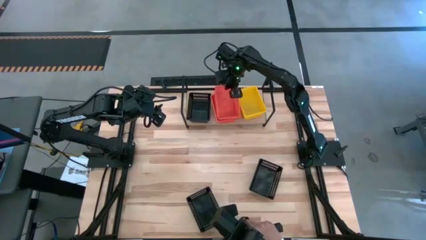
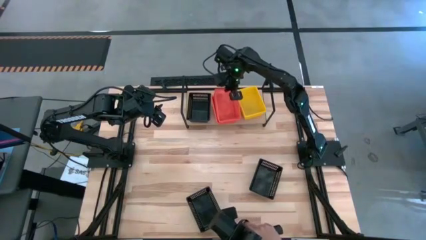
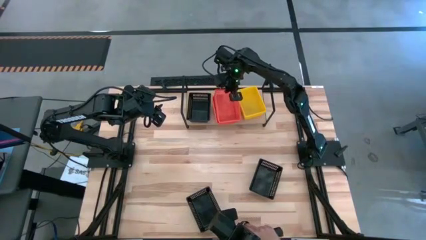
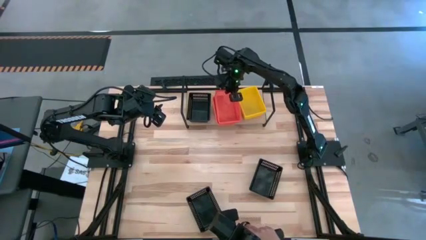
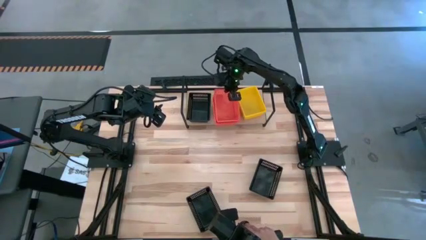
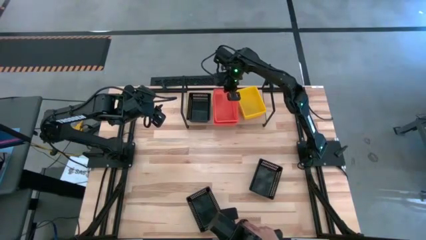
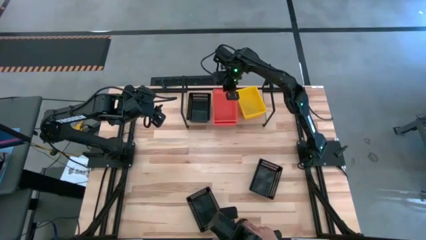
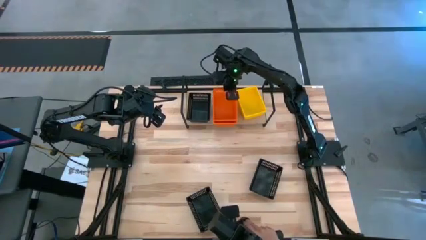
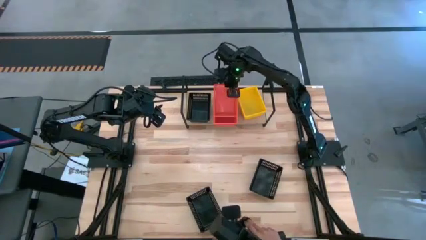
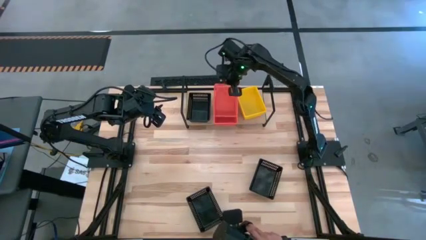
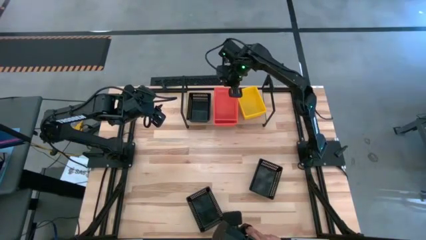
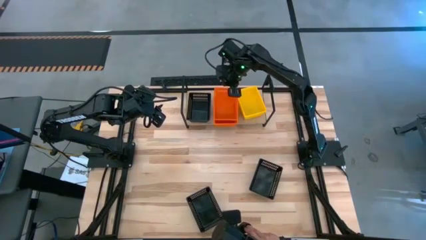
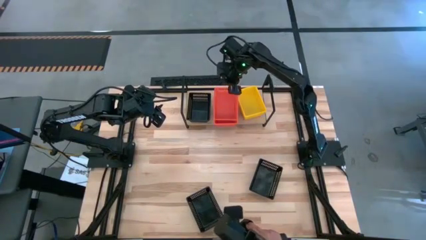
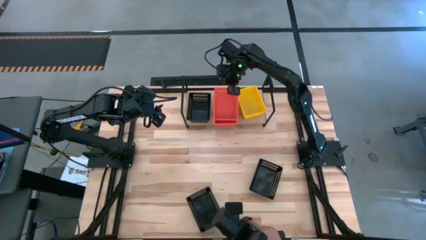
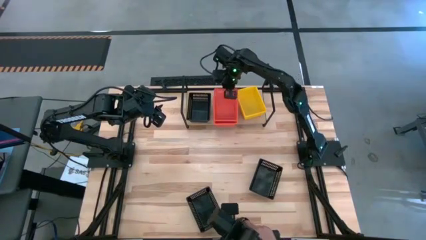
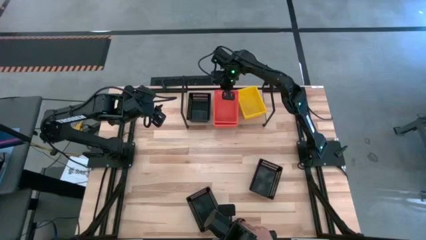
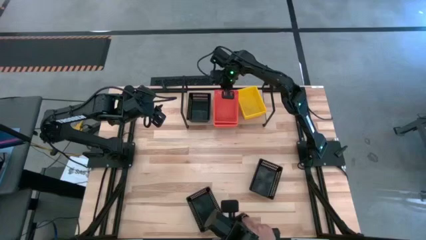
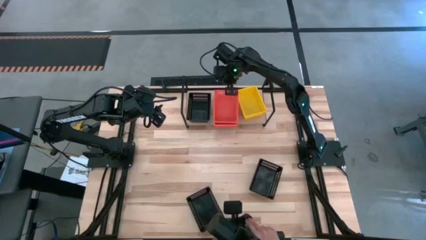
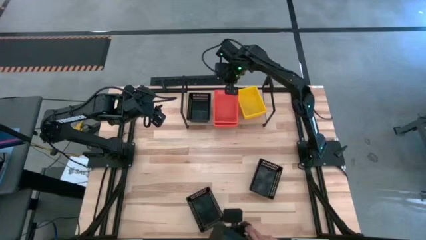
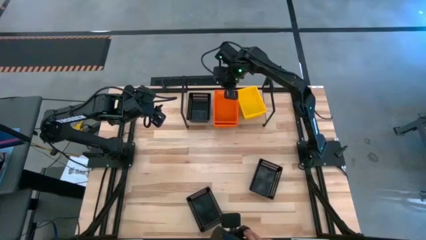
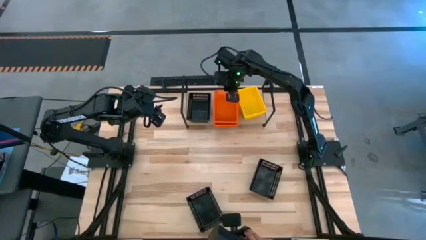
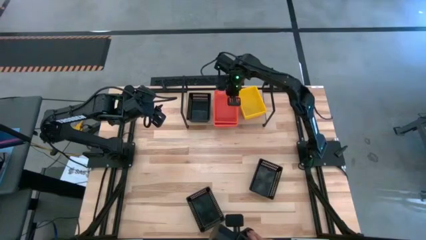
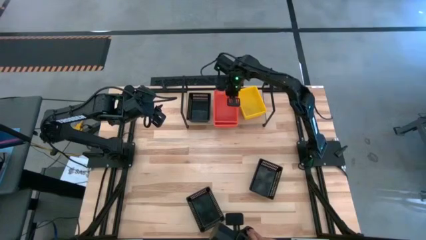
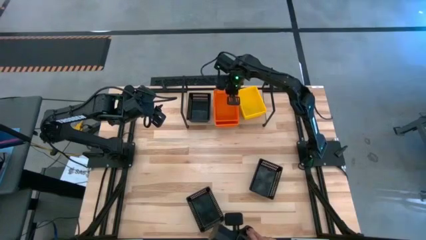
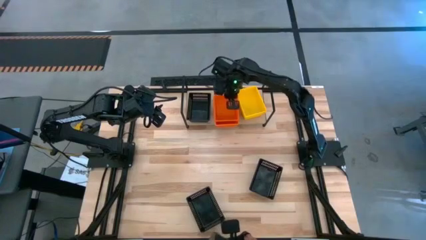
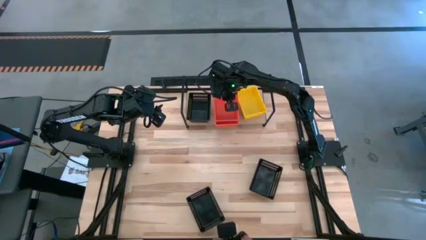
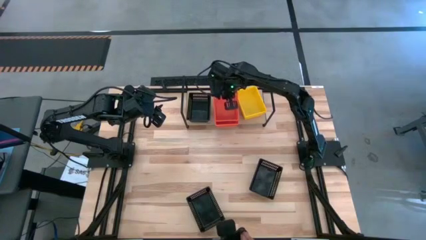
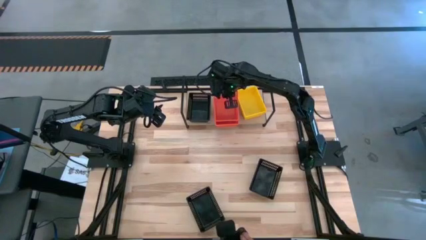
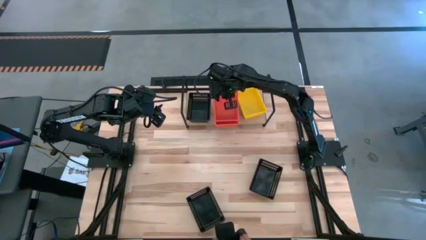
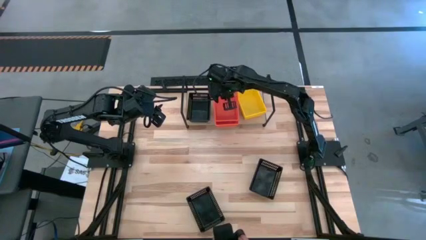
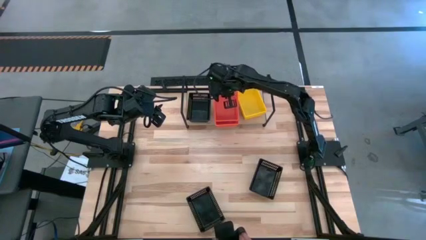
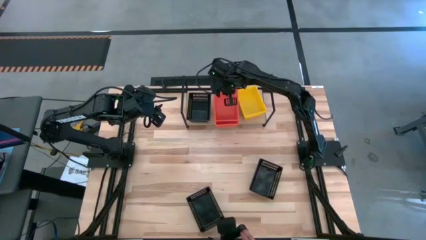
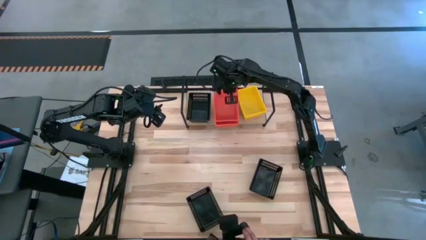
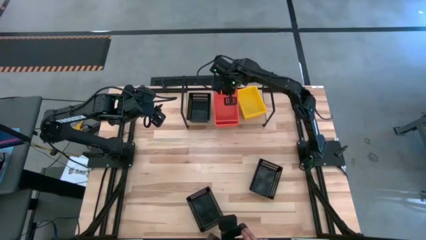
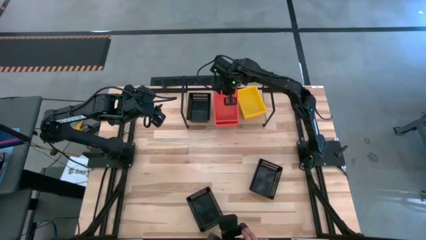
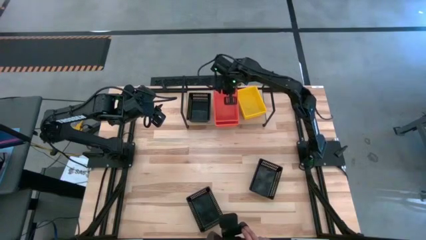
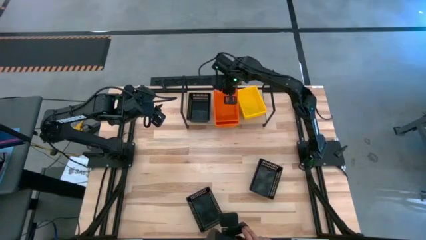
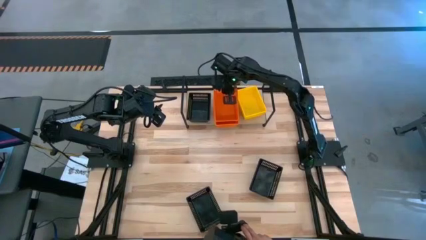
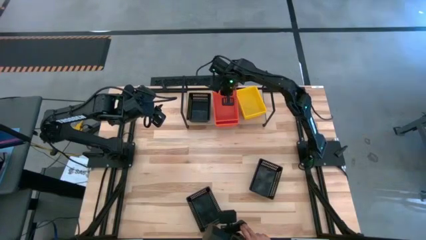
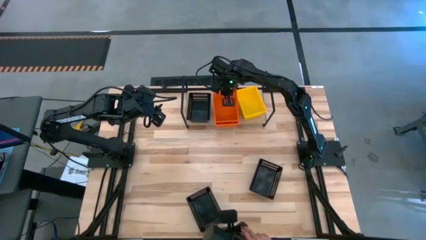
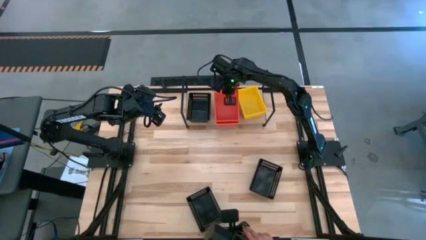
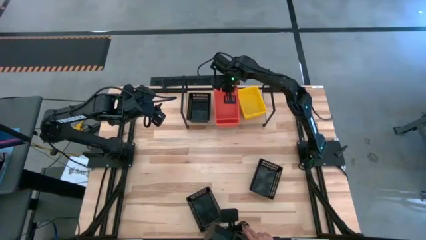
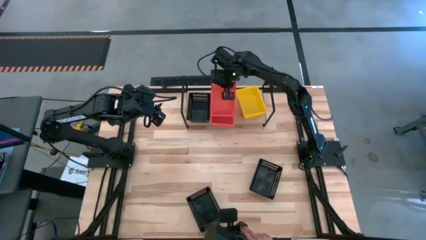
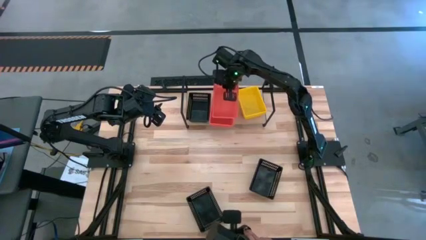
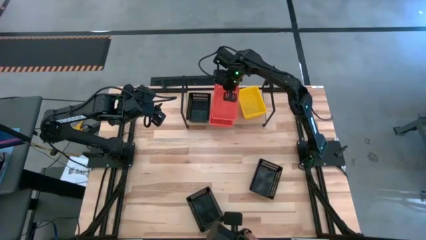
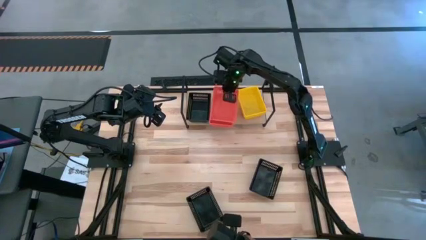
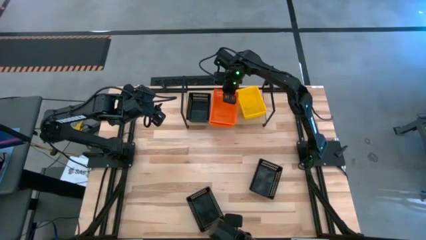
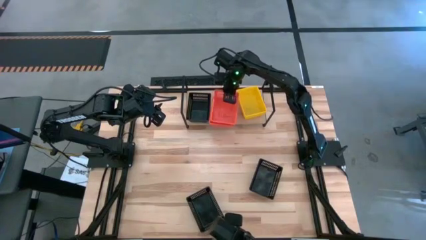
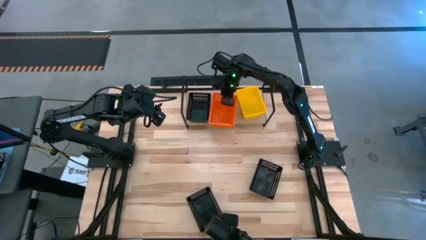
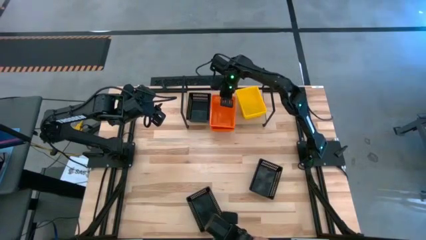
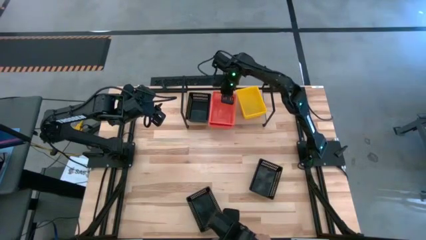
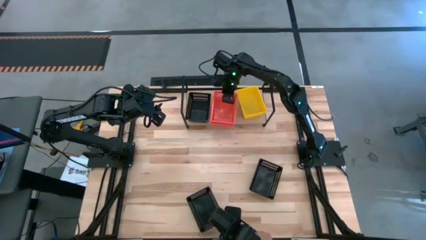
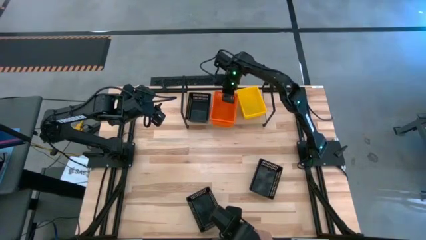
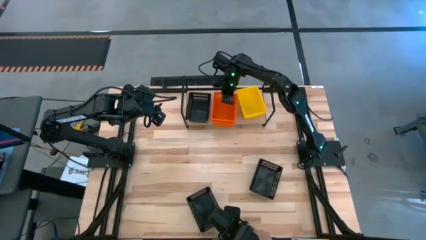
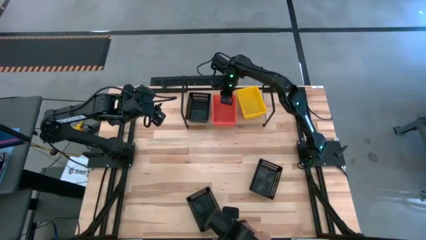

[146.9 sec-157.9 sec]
Task: Stack baskets on shelf by color
Stack the orange bin on top of the other orange bin on the shelf
